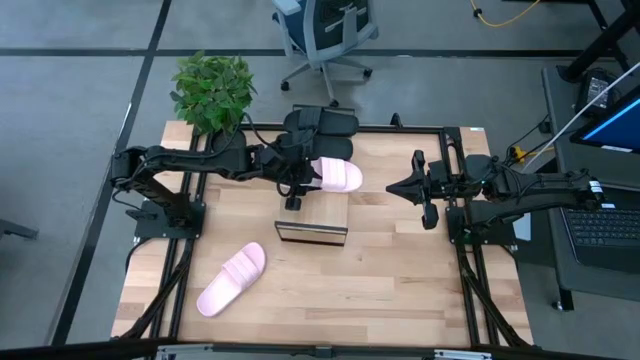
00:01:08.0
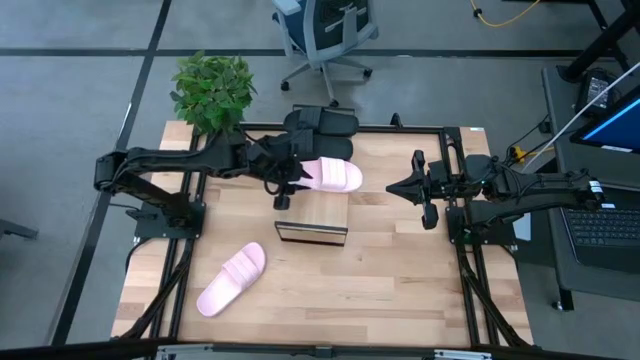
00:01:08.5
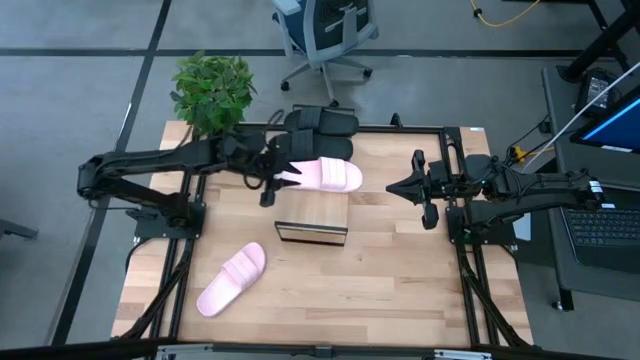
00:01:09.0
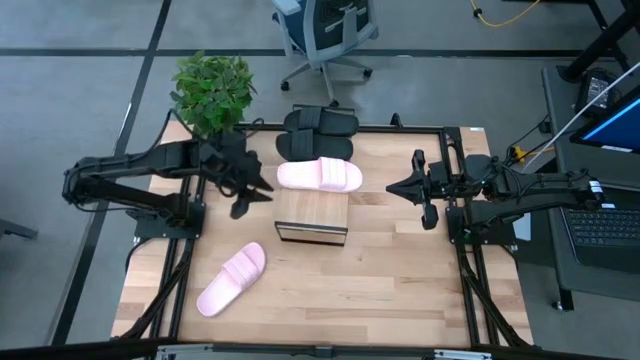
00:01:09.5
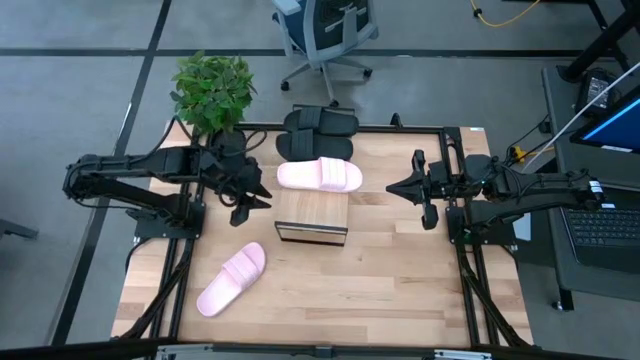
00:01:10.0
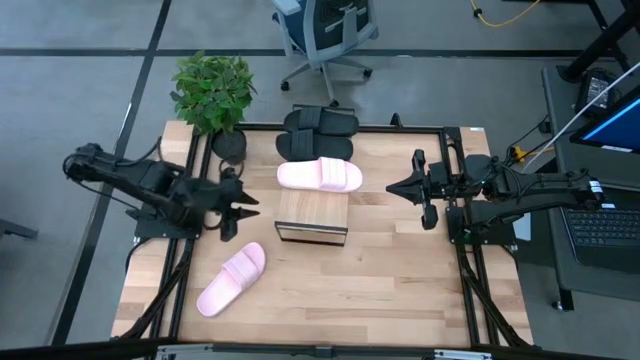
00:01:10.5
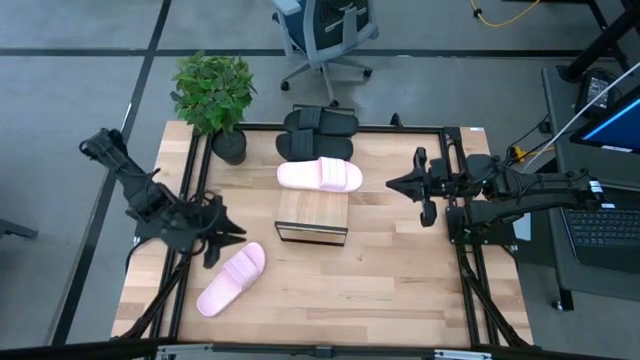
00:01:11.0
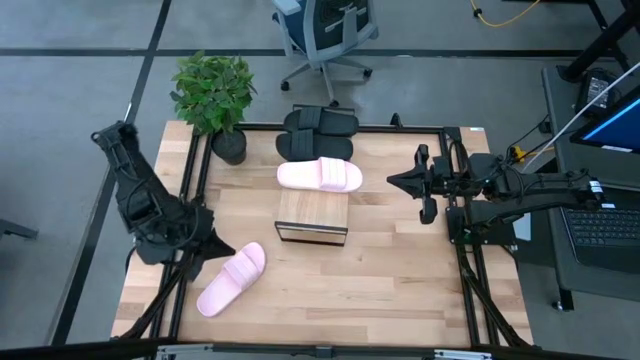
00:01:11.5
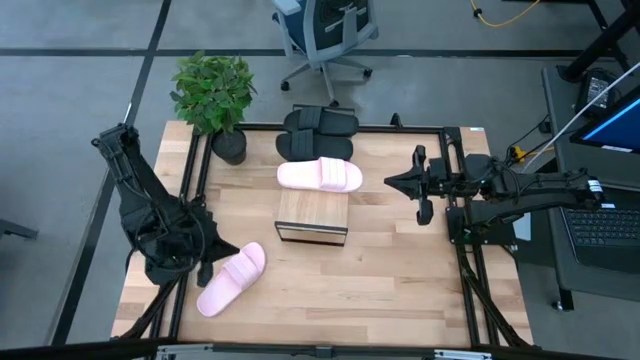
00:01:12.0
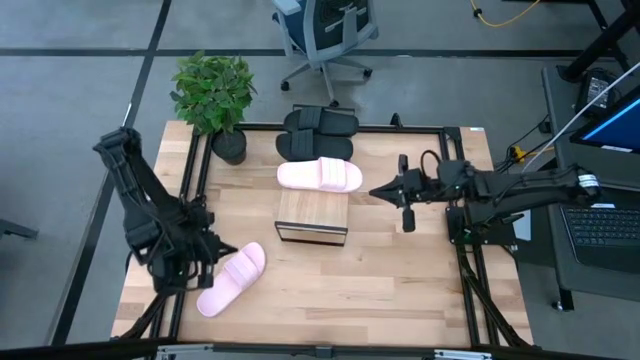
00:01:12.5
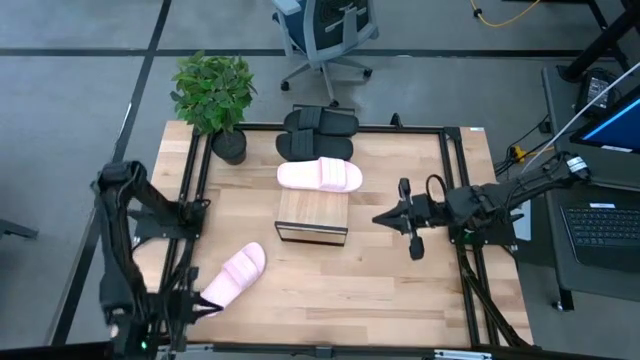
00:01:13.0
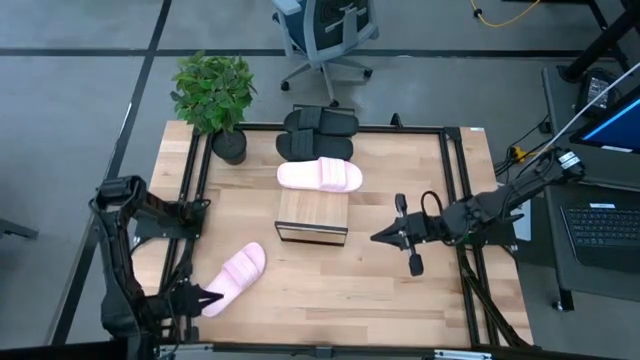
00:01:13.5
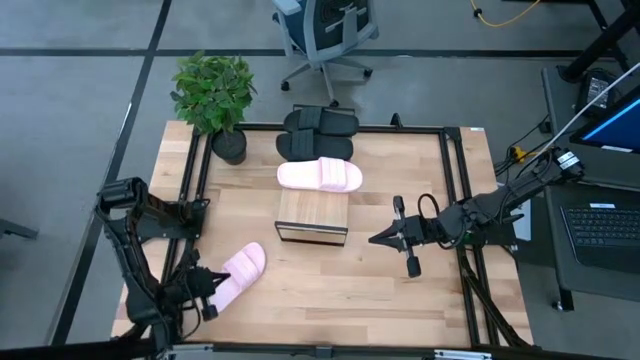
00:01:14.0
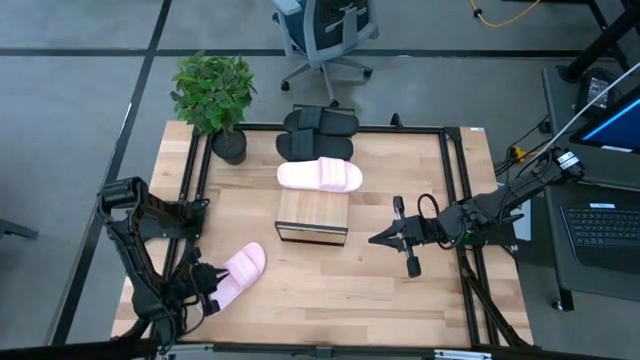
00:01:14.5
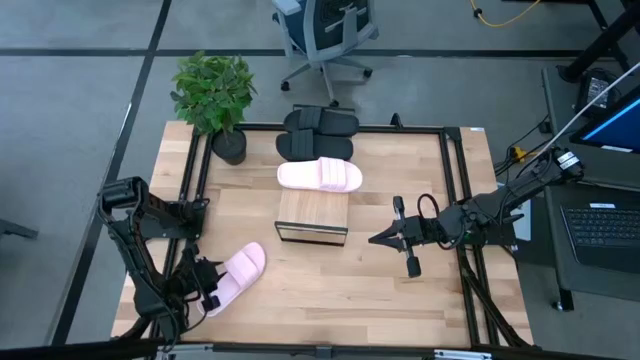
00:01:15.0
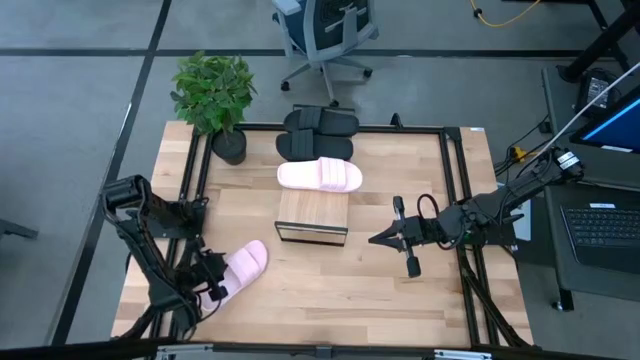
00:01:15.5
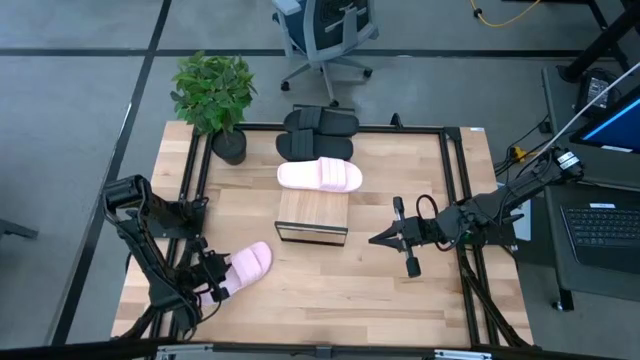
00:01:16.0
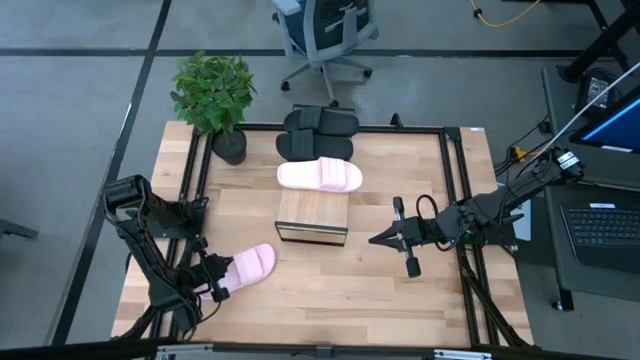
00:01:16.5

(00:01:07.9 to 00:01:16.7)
Task: Pick and place slides into the shelf
Put the pink slipper on the shelf

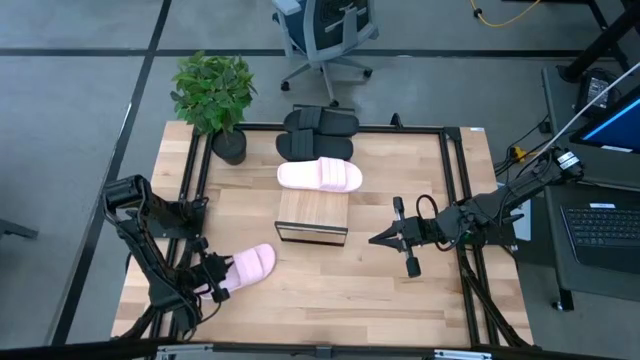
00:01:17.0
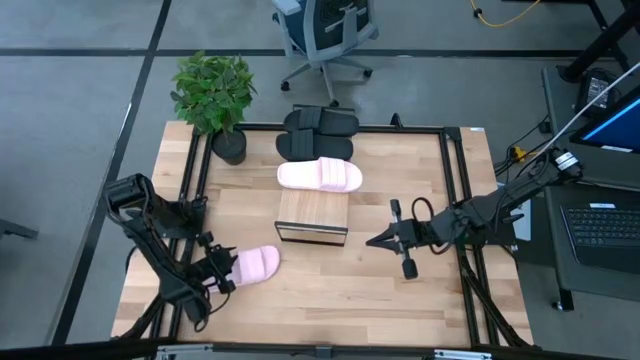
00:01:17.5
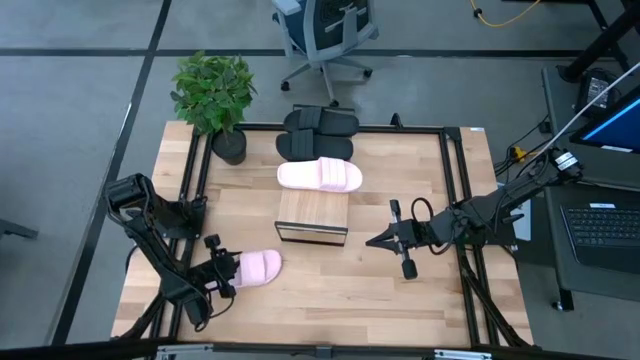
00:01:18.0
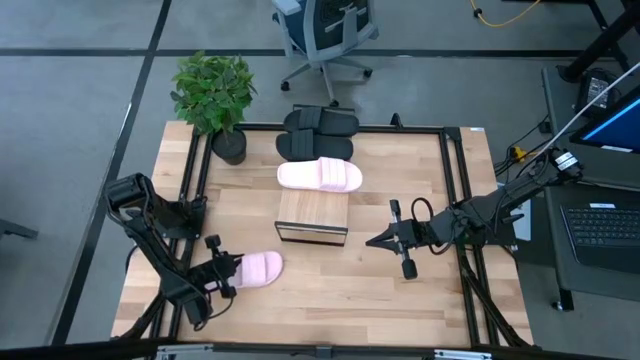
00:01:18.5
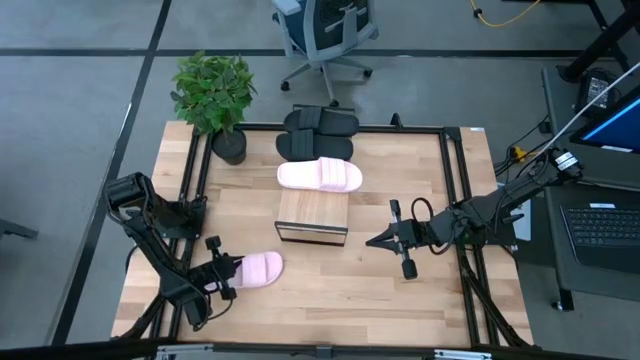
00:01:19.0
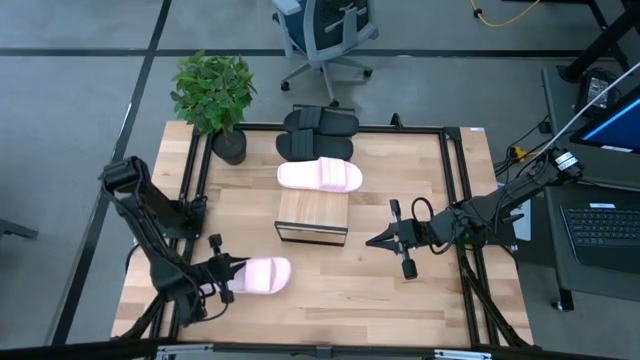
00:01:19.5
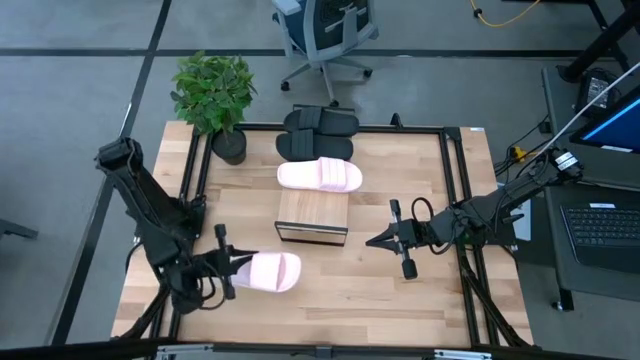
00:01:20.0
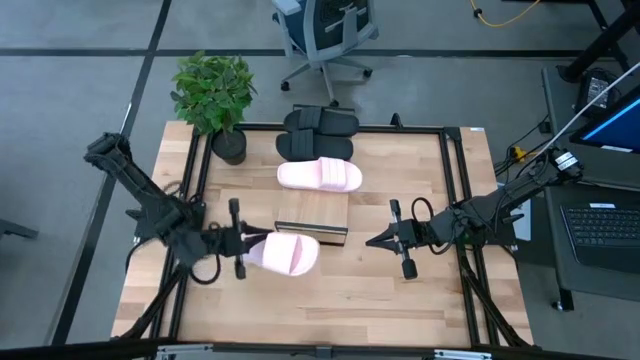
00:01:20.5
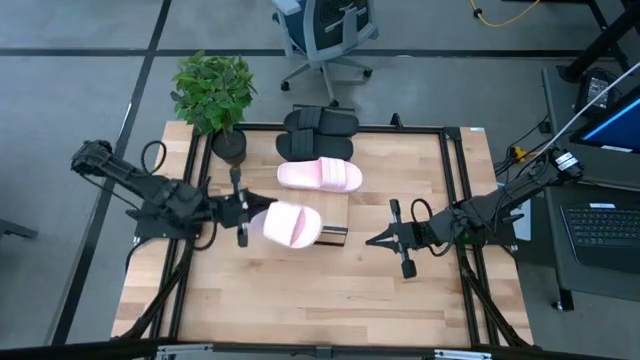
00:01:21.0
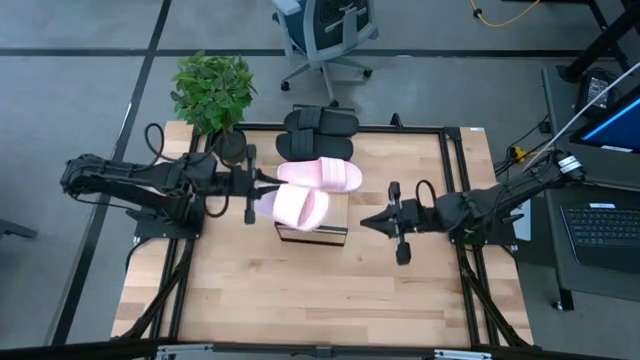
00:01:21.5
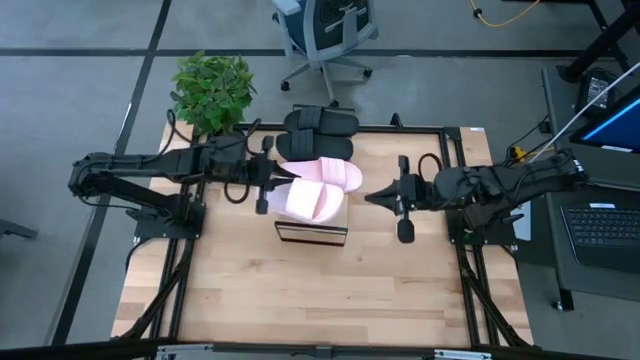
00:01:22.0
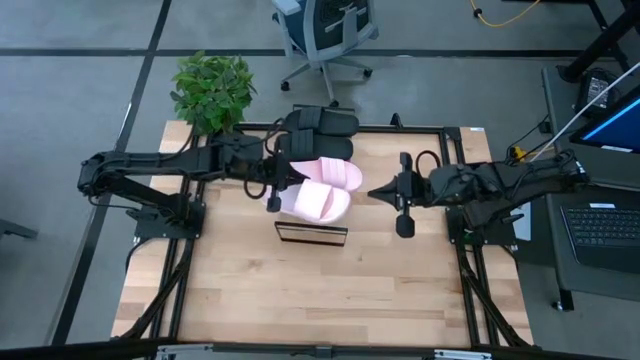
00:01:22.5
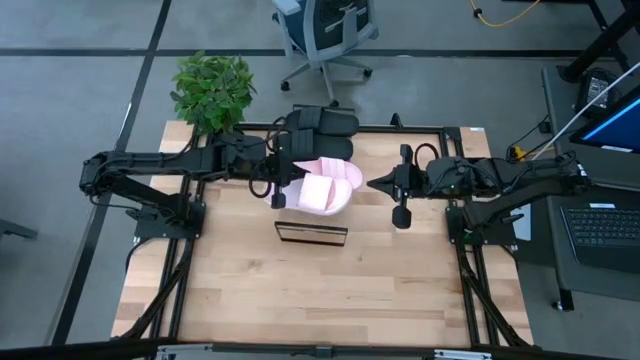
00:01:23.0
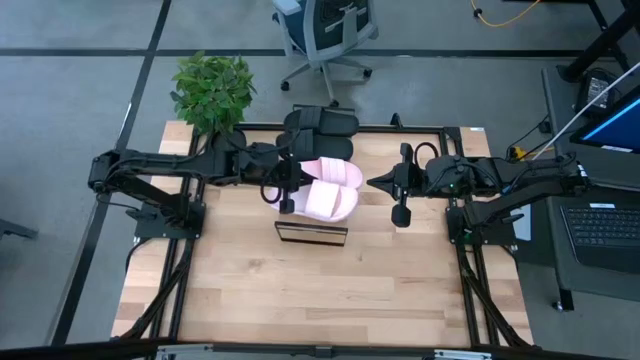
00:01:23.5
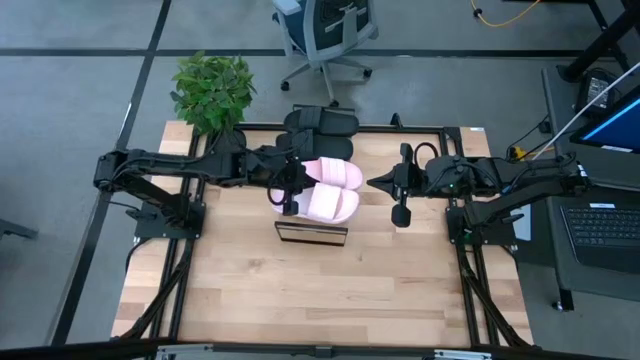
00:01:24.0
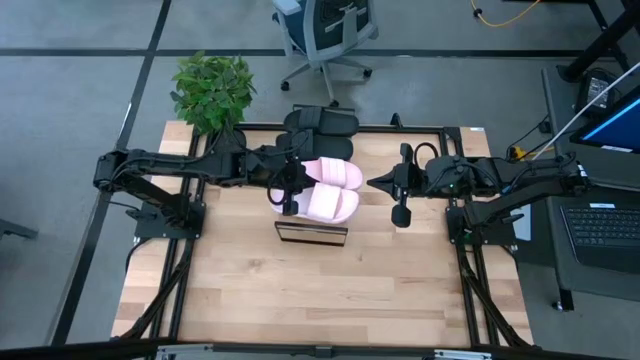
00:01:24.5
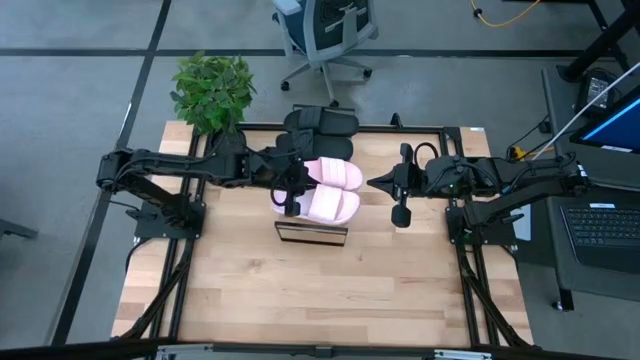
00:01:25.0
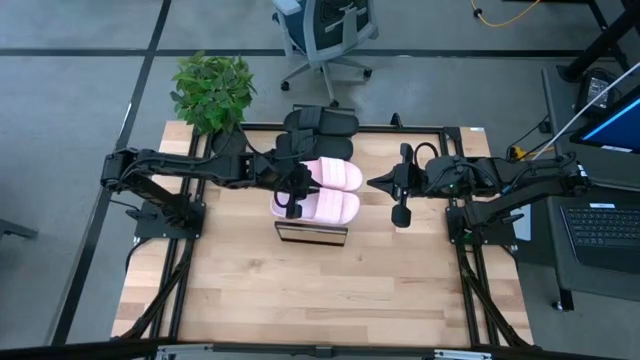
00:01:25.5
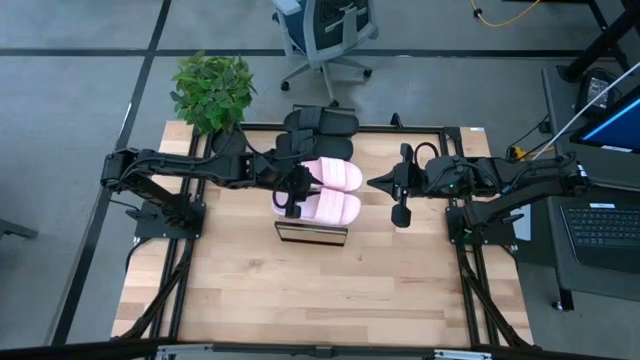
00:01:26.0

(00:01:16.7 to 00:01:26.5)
Put the pink slipper on the shelf

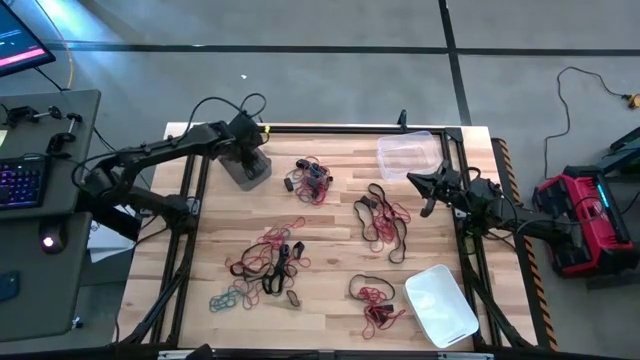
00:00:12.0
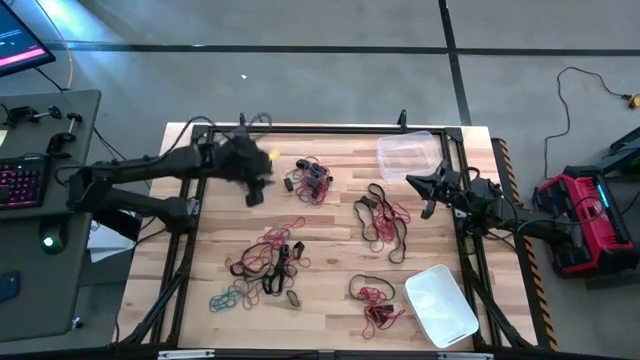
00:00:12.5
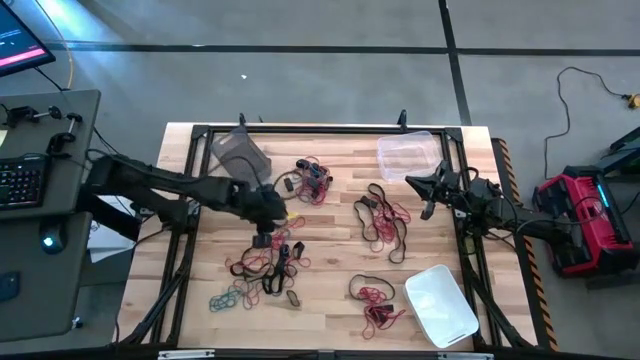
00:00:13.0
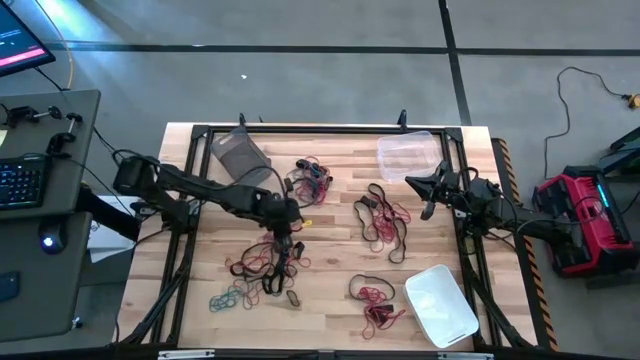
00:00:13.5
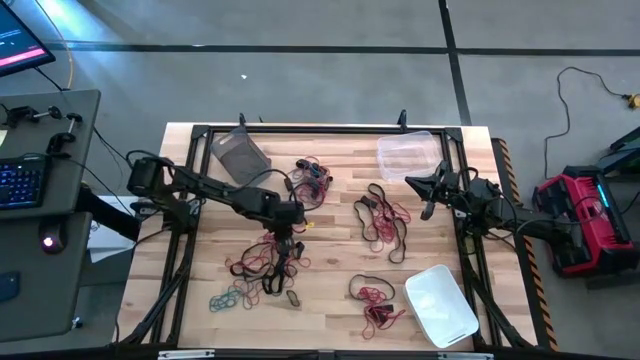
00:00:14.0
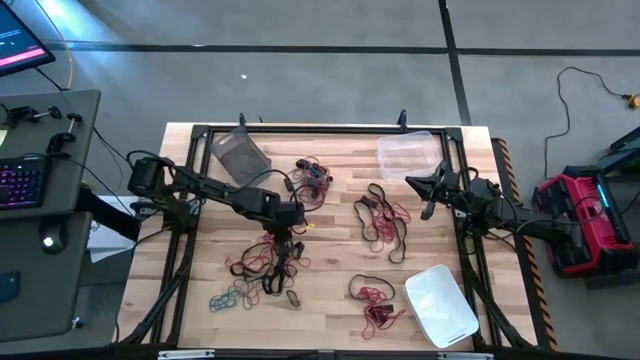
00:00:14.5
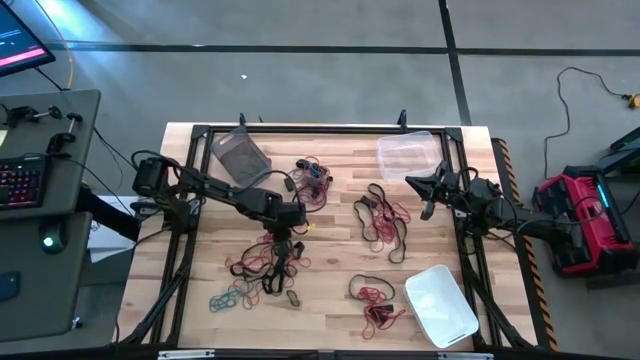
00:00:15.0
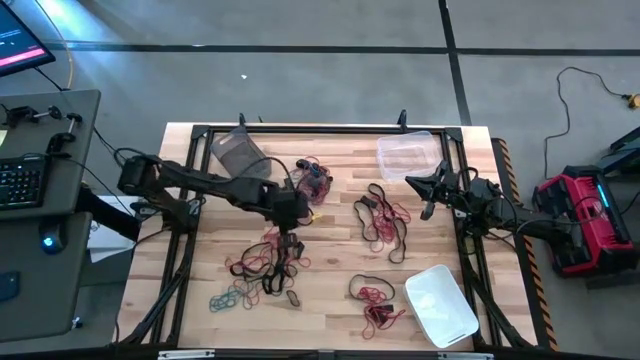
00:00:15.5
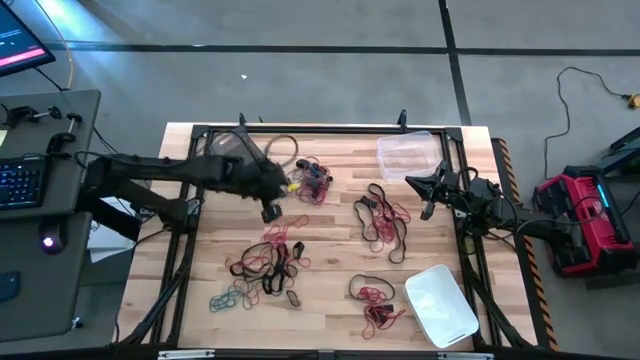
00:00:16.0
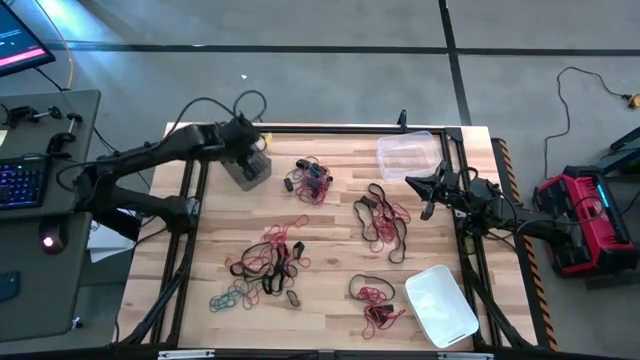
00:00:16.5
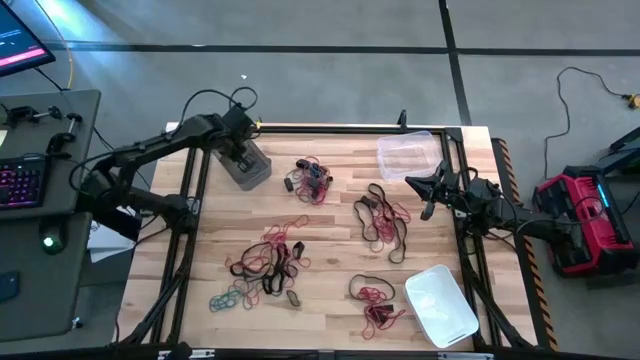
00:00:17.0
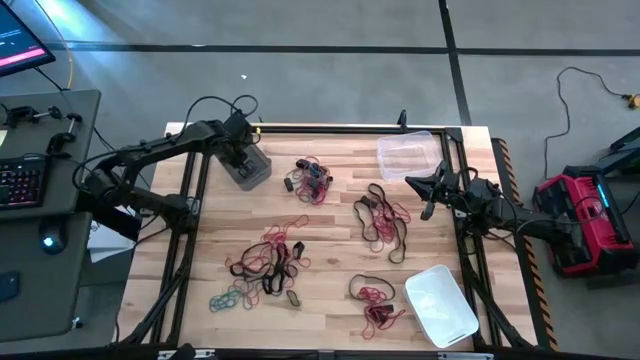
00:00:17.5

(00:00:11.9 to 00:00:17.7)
Task: Sort rubber bands into baskets
Put the blue rubber band into the black bin
